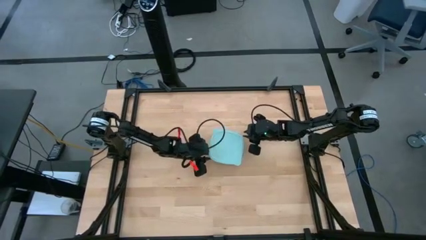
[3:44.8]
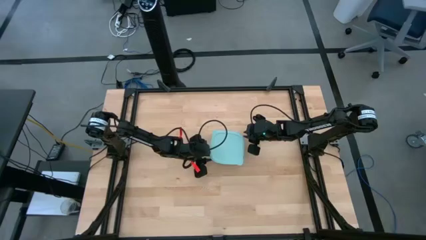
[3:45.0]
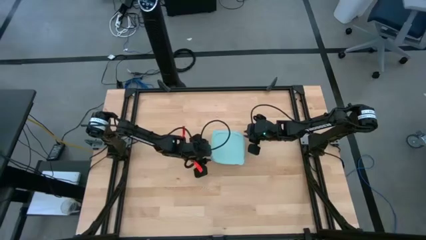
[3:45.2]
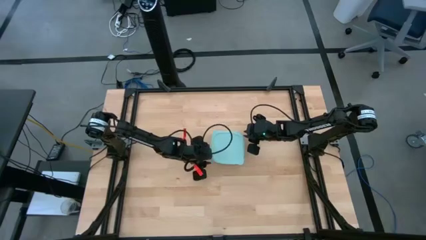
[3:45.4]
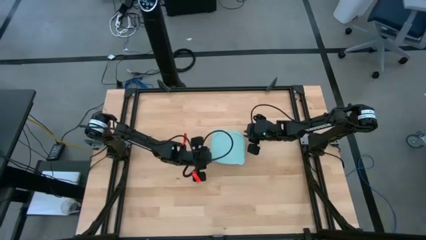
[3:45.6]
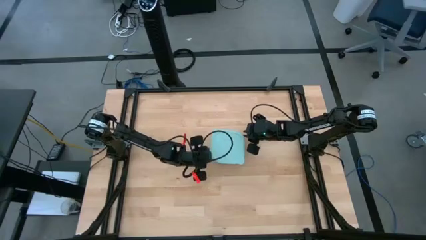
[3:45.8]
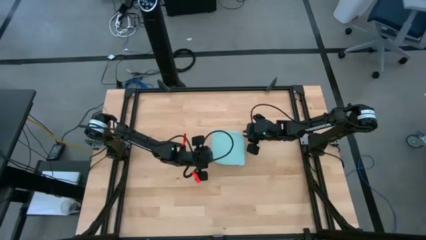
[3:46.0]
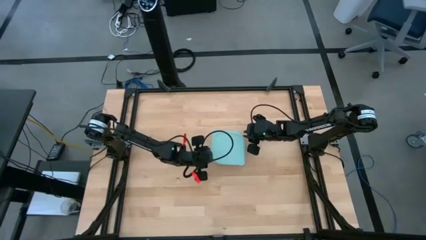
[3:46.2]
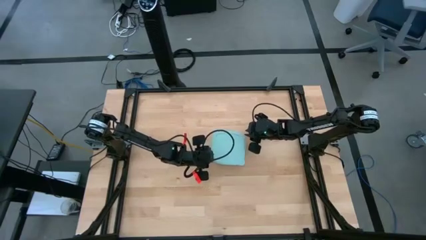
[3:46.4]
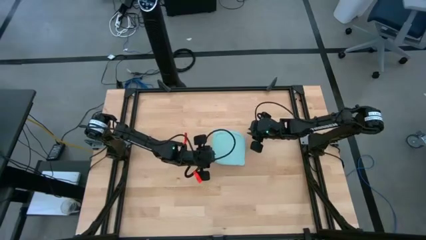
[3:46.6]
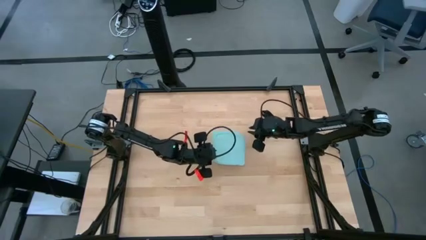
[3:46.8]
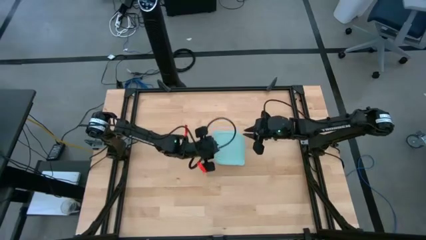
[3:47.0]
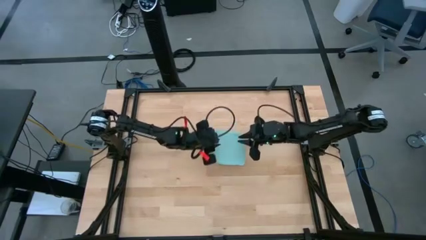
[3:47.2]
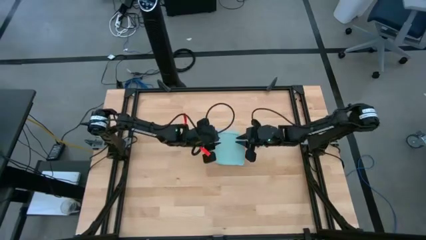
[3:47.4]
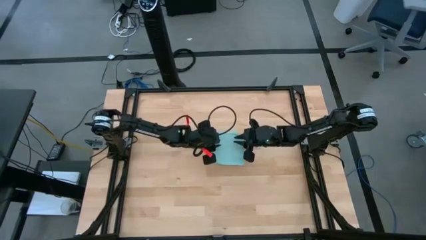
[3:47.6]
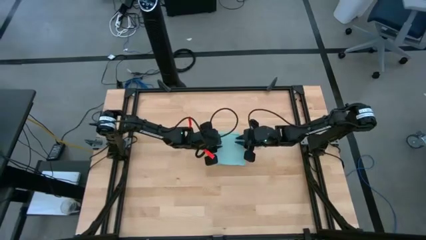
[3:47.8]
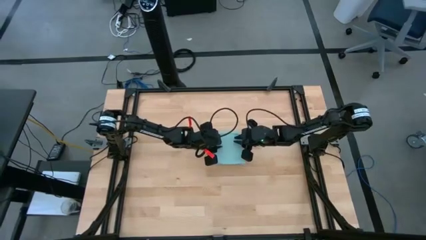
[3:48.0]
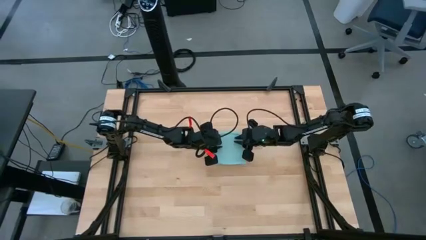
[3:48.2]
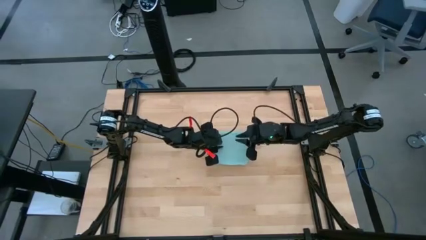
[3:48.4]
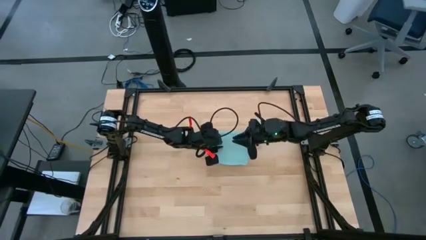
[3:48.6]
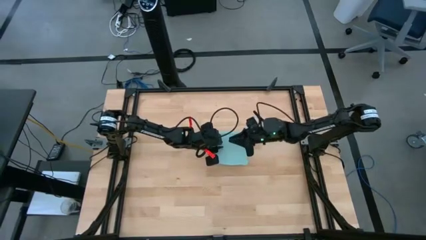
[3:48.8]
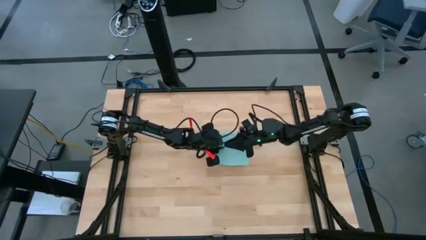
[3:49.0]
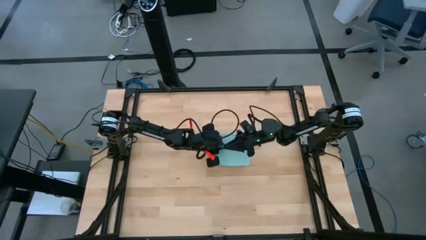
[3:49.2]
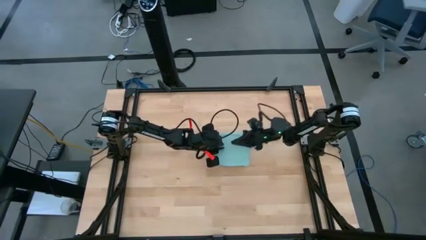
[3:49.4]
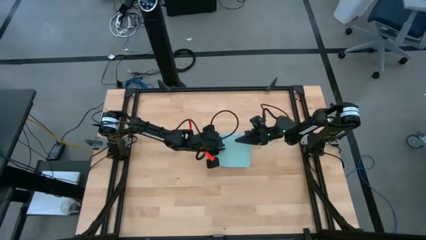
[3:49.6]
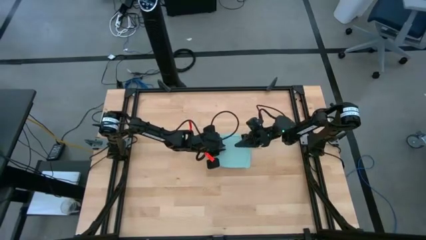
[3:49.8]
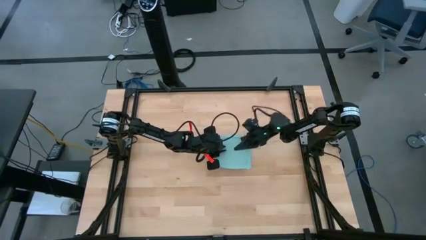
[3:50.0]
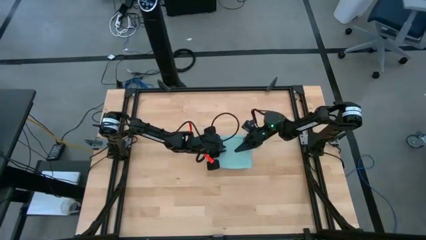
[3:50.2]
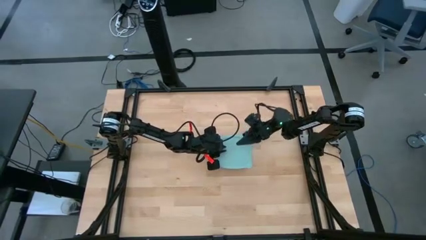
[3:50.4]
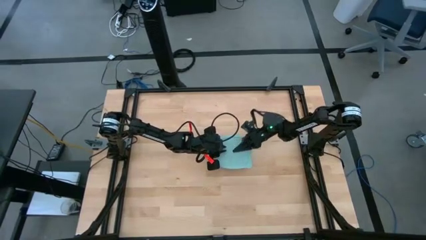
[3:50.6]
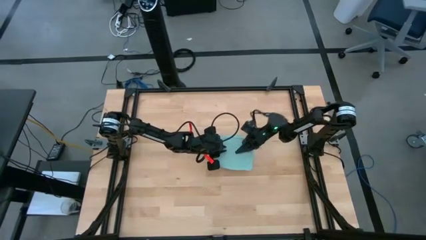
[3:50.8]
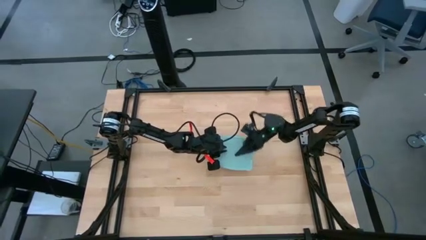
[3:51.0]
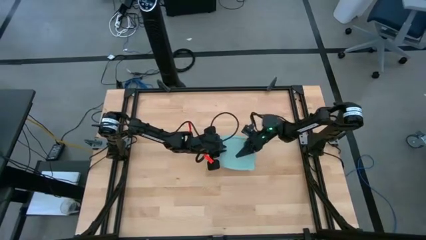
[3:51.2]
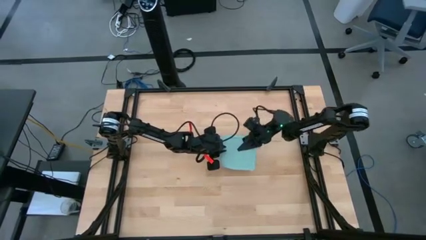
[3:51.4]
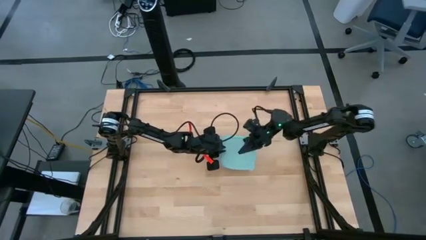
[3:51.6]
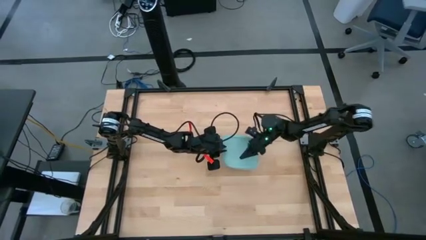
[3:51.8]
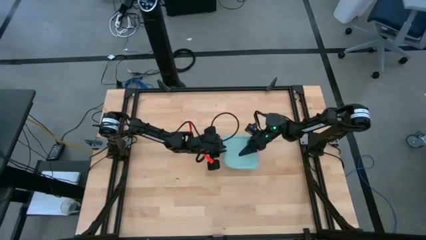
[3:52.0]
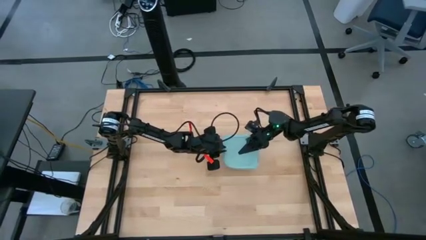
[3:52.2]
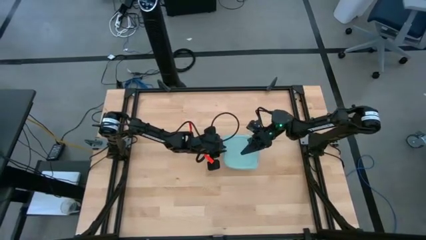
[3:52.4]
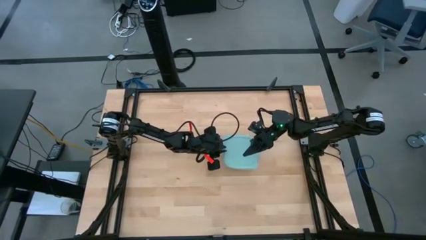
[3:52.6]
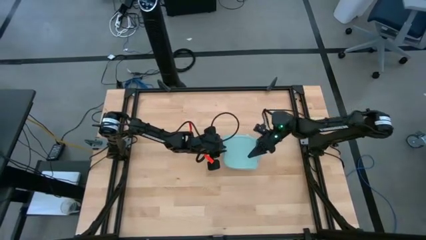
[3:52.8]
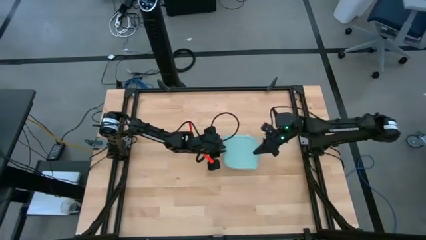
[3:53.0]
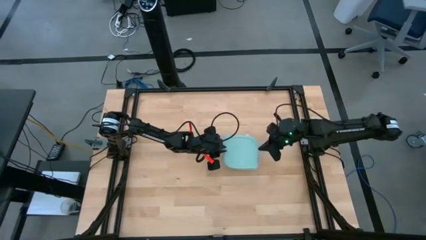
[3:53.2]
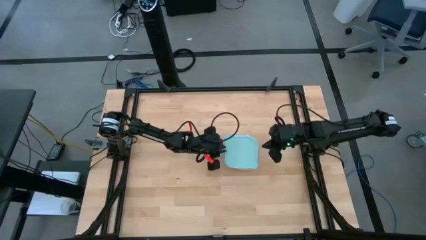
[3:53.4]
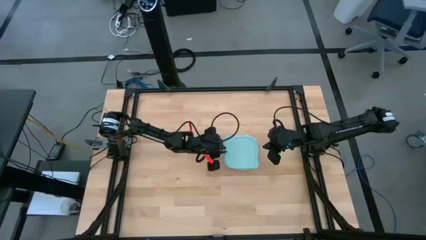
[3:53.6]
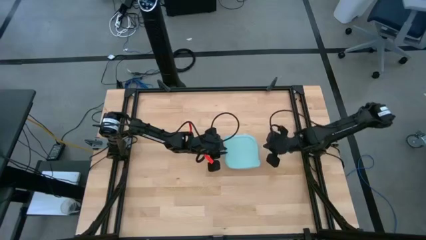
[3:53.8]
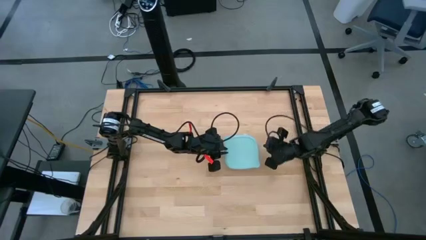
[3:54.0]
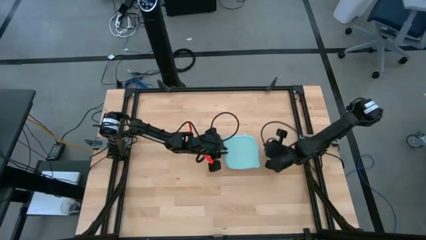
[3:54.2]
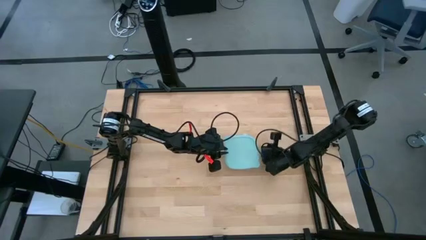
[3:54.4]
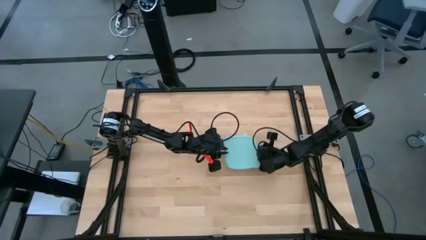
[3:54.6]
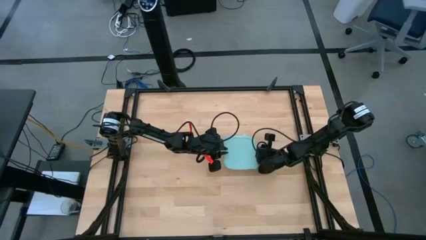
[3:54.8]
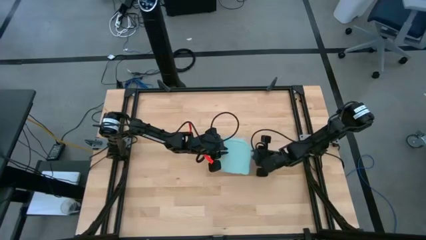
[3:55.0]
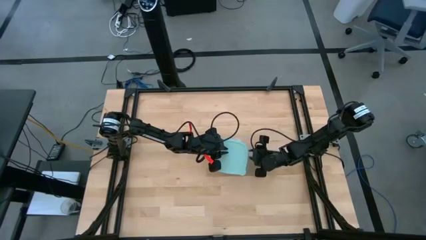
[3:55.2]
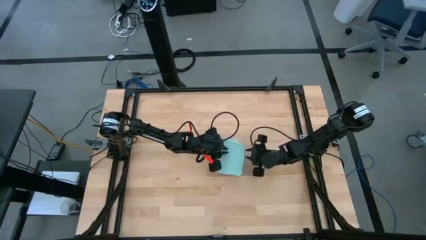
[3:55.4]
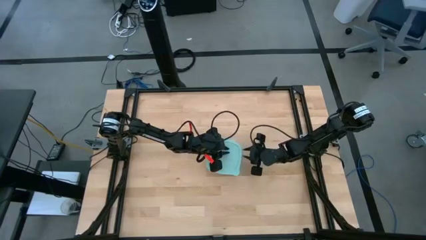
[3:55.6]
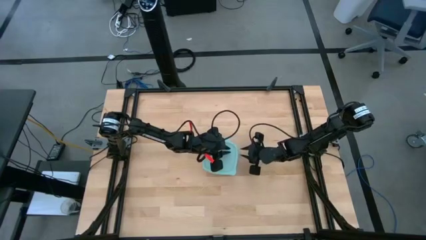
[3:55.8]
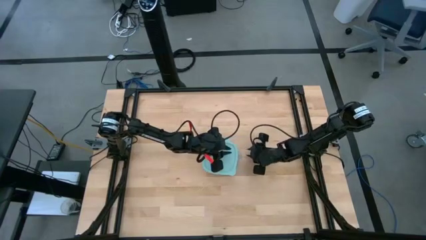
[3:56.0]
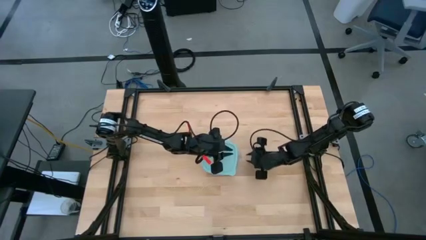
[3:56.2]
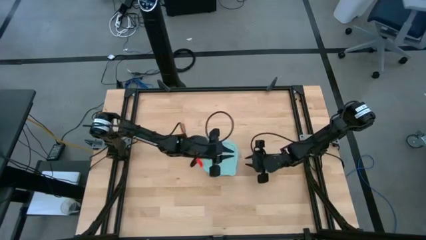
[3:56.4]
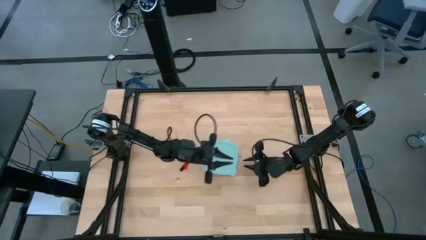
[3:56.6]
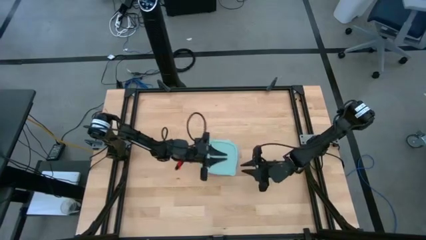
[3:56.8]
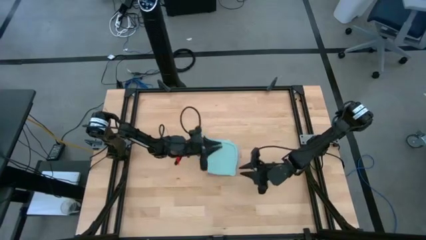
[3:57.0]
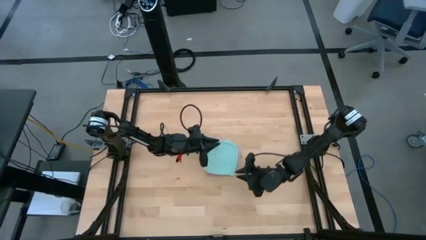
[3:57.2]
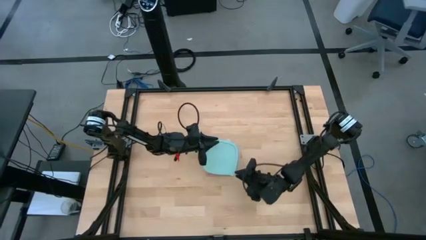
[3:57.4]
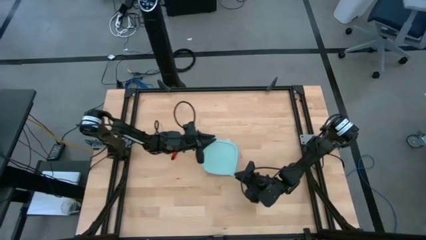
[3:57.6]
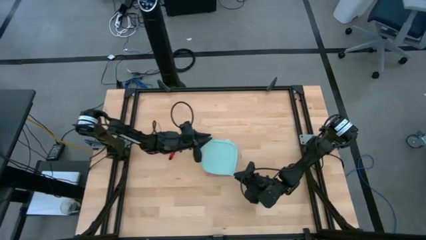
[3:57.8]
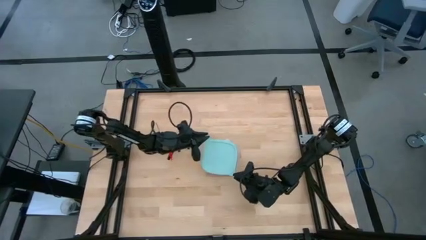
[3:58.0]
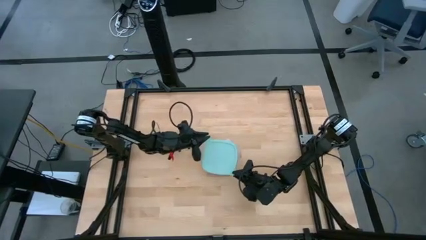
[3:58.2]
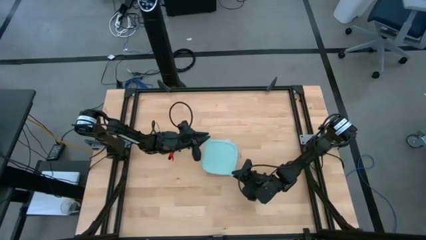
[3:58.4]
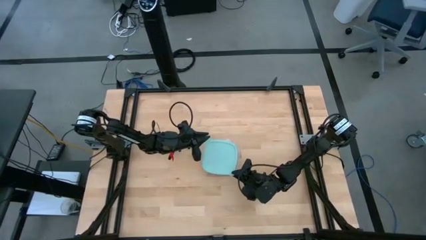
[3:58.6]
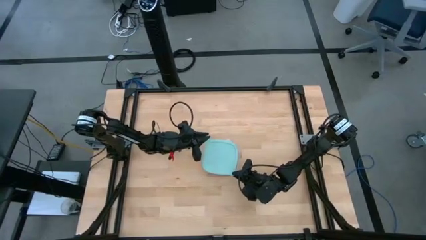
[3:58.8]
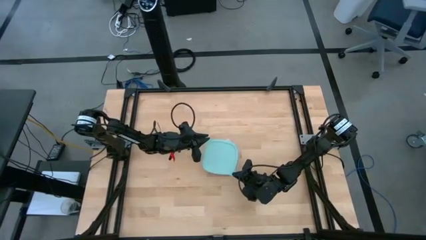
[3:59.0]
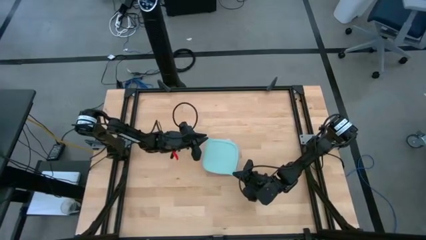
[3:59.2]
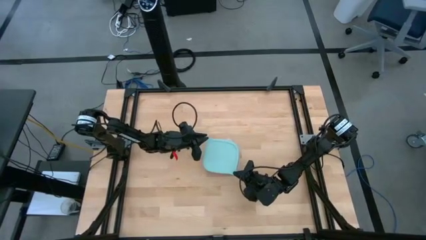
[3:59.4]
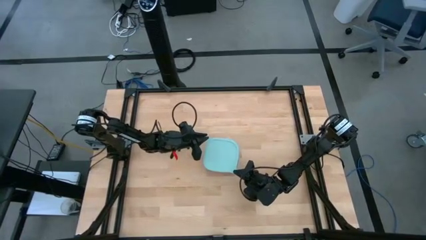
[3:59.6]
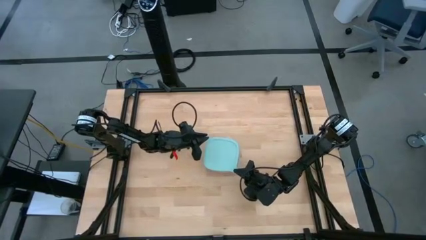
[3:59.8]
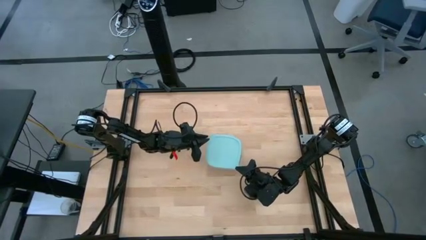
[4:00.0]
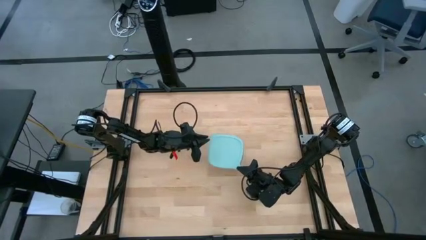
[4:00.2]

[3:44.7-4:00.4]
Task: Roll bandage
Close the transparent tupperware

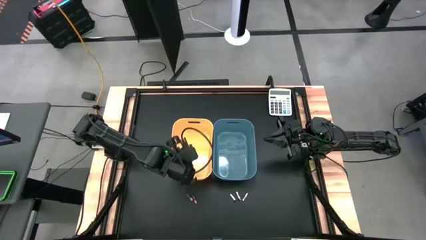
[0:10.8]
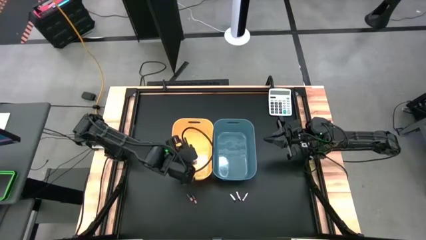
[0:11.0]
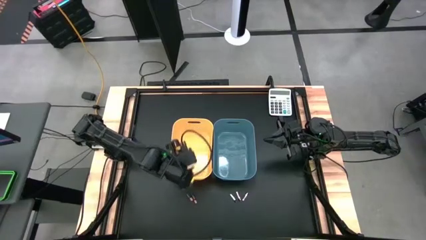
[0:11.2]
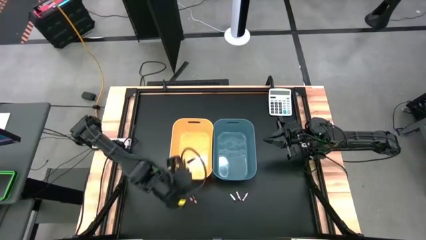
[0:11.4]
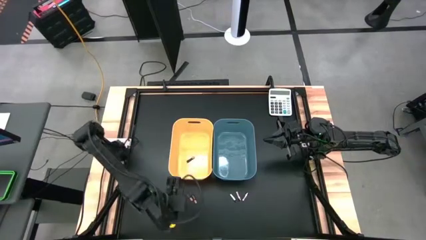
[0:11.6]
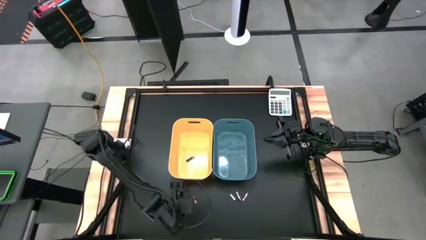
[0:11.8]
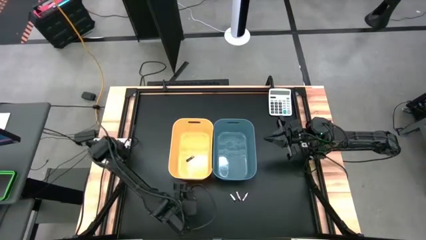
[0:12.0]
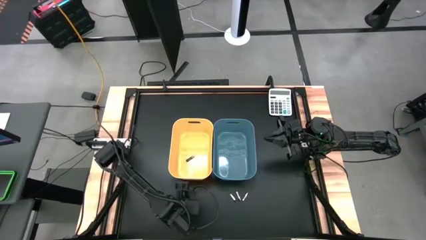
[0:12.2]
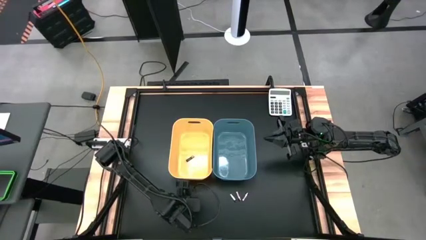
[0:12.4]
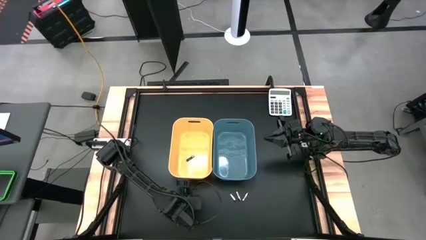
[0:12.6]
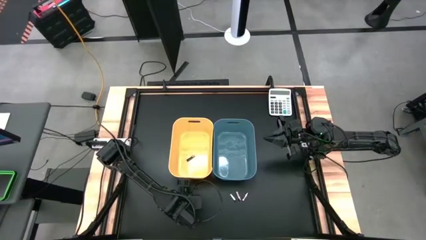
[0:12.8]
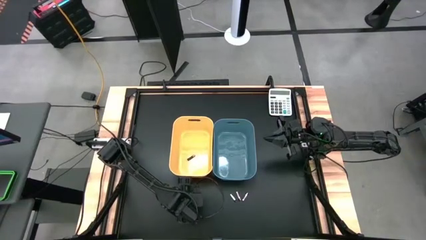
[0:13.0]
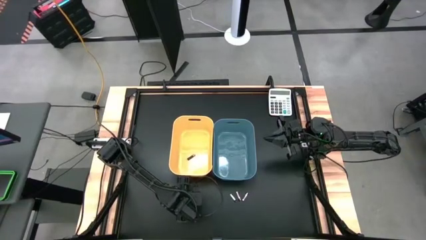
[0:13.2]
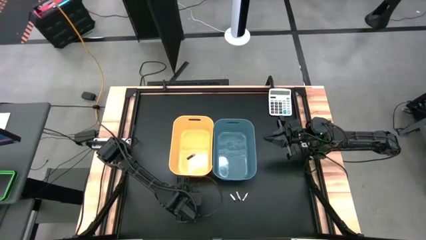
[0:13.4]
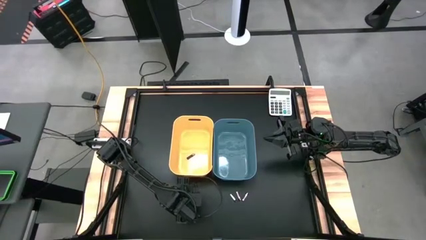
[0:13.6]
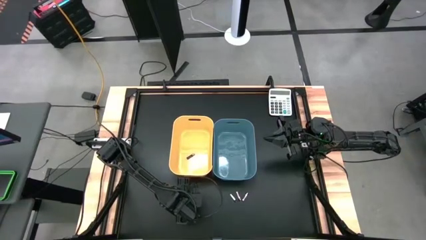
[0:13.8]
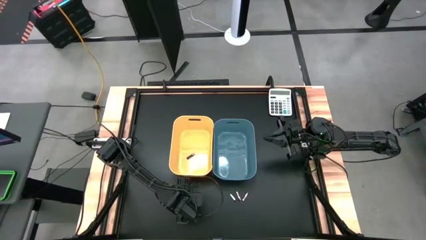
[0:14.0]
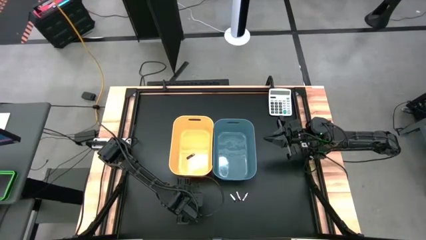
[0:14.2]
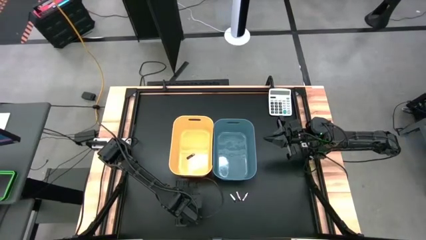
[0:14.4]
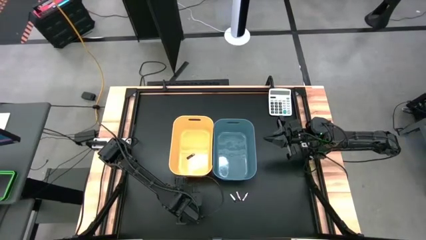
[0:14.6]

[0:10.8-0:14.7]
Task: Sort batteries
Put the left black battery into the yellow bin
